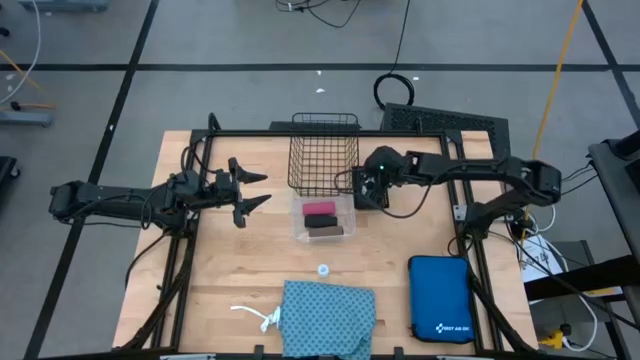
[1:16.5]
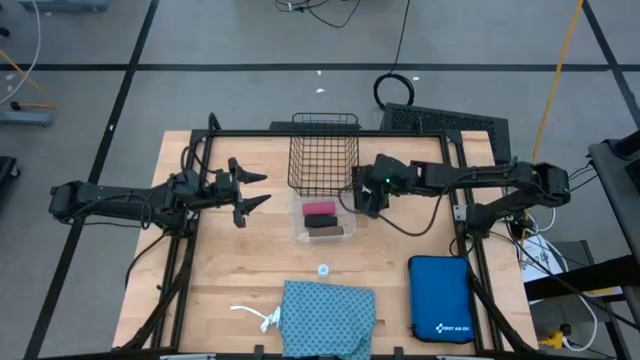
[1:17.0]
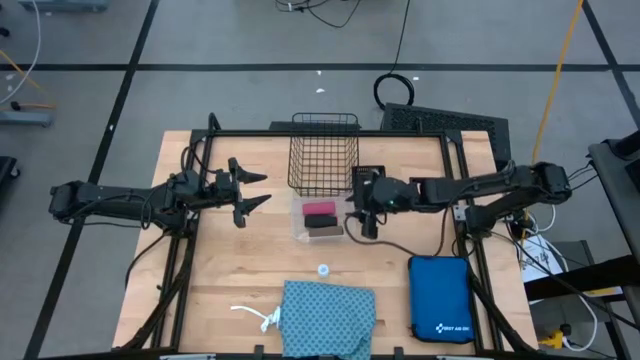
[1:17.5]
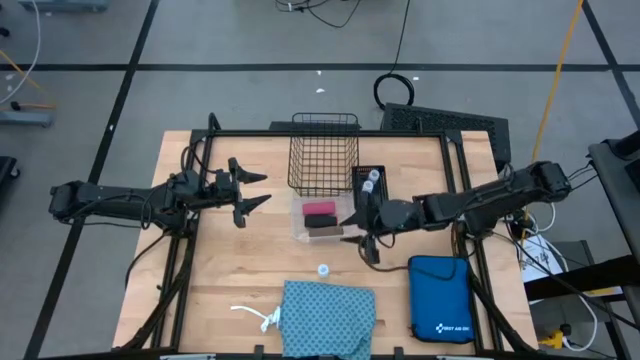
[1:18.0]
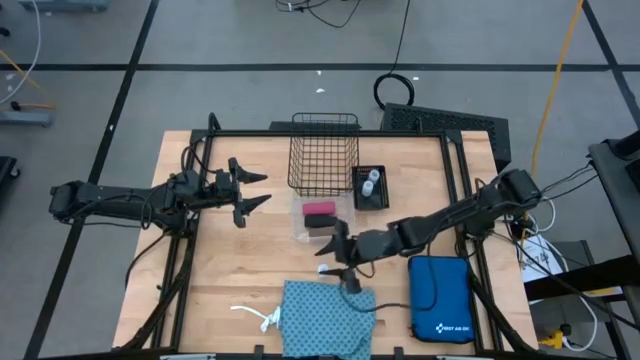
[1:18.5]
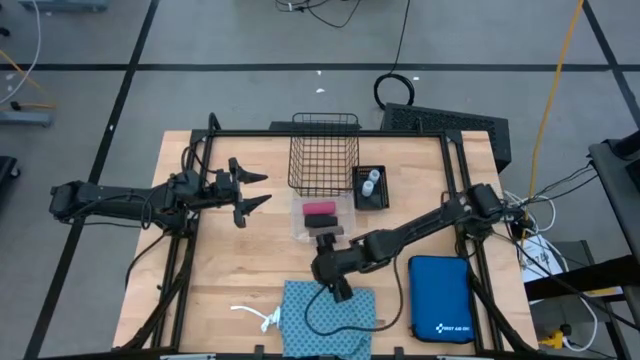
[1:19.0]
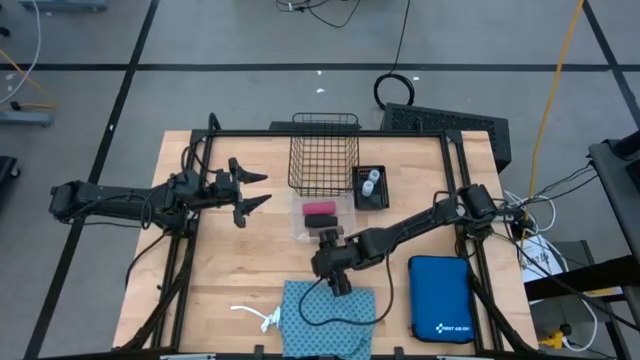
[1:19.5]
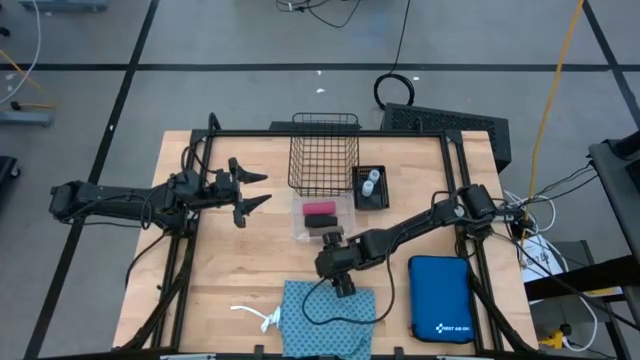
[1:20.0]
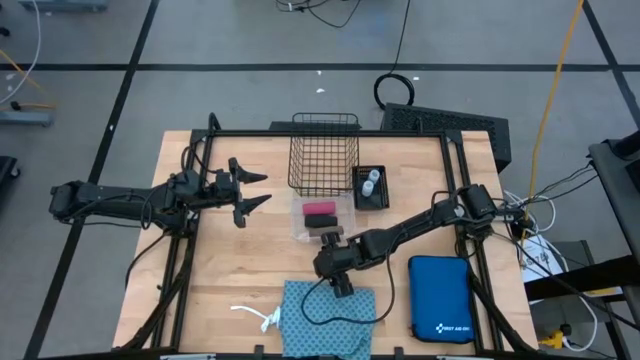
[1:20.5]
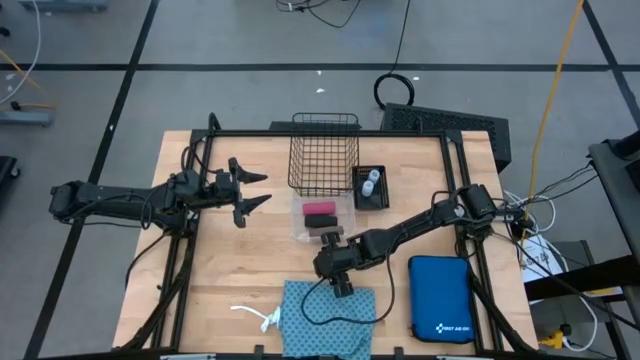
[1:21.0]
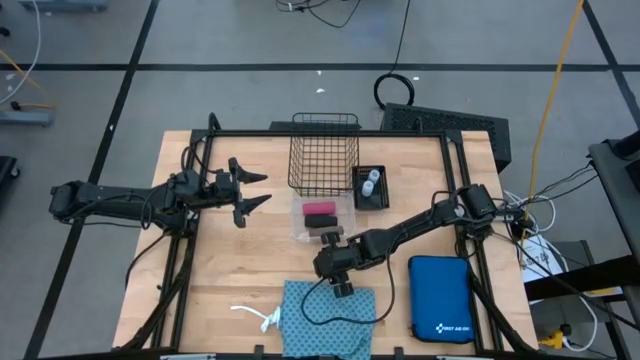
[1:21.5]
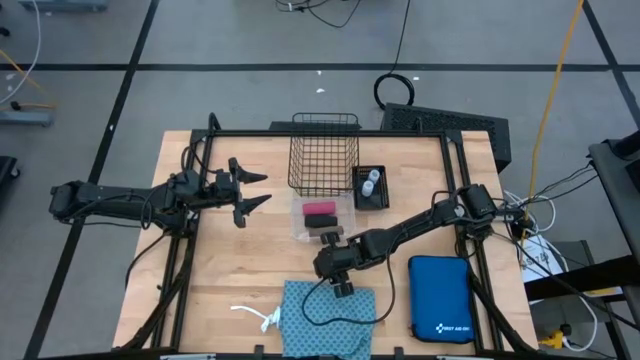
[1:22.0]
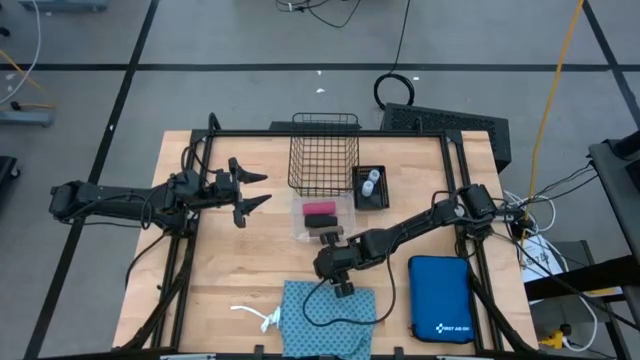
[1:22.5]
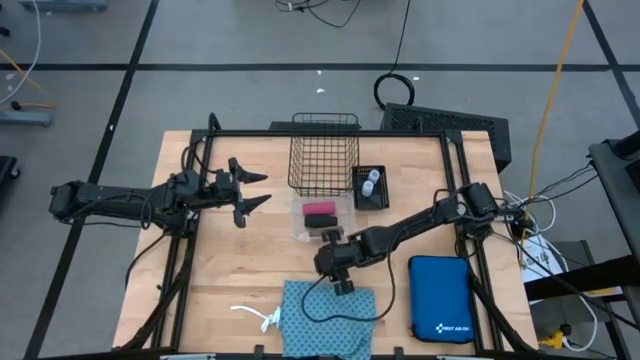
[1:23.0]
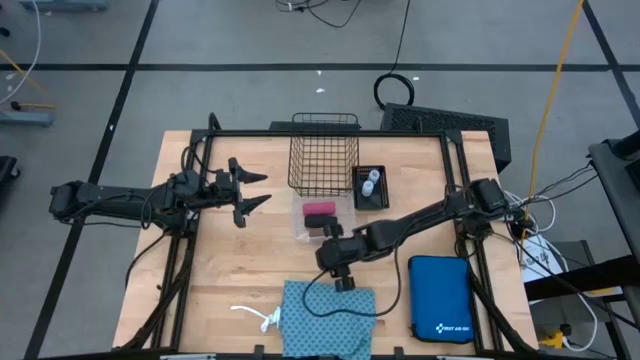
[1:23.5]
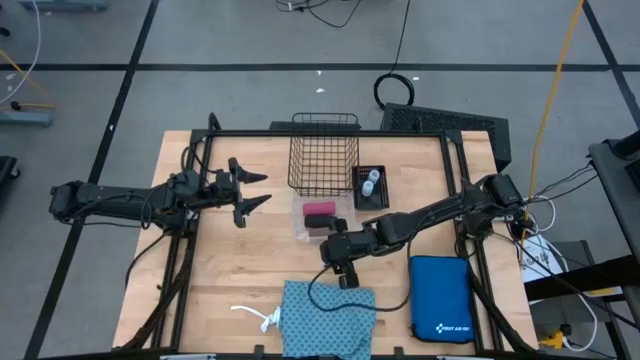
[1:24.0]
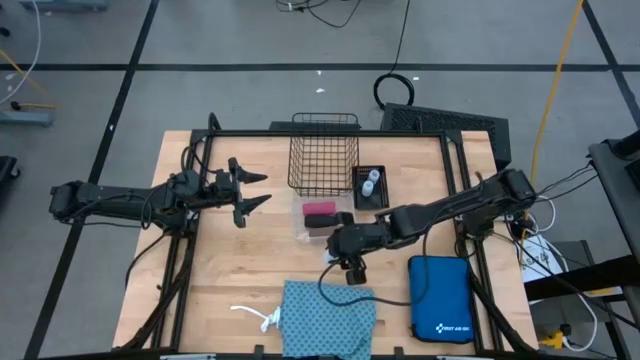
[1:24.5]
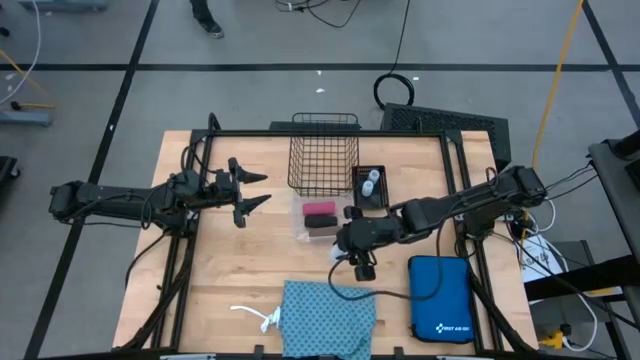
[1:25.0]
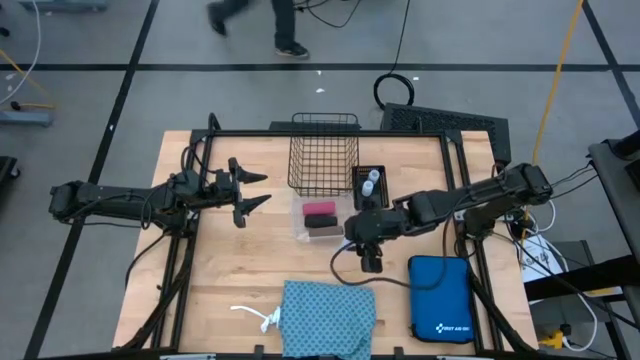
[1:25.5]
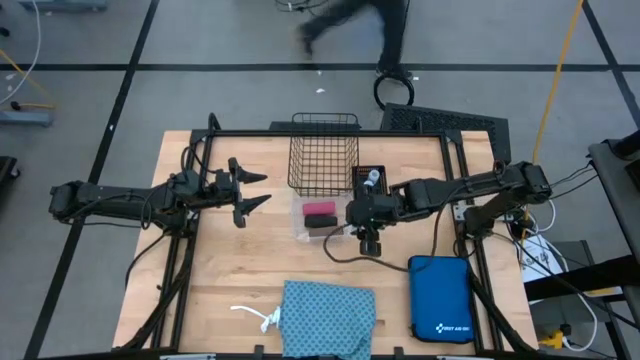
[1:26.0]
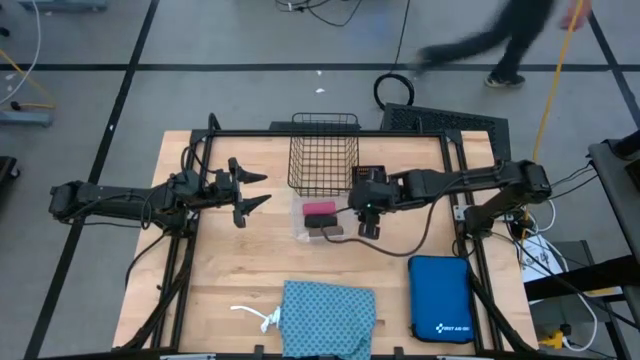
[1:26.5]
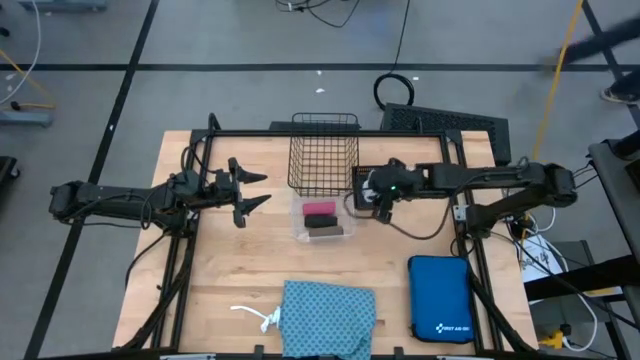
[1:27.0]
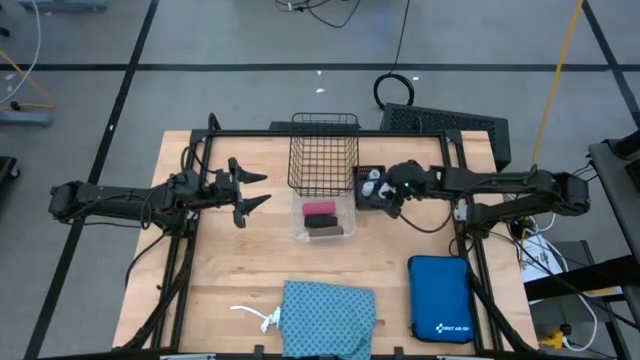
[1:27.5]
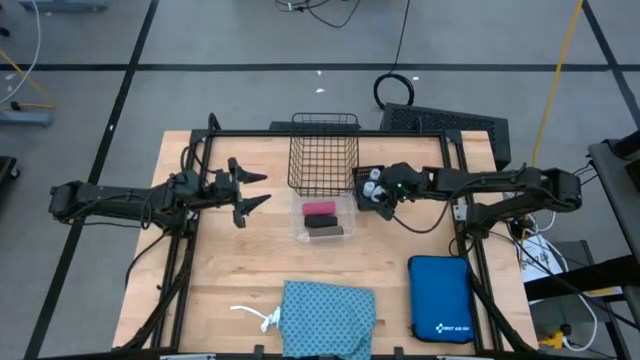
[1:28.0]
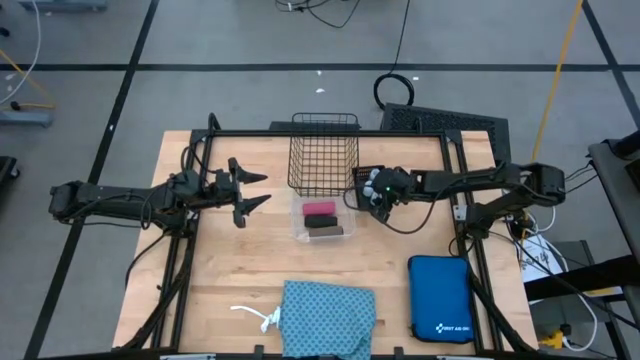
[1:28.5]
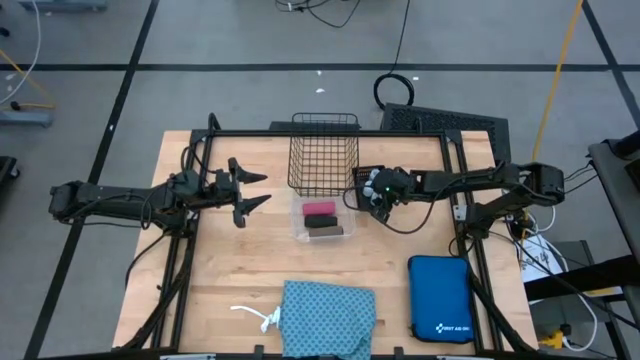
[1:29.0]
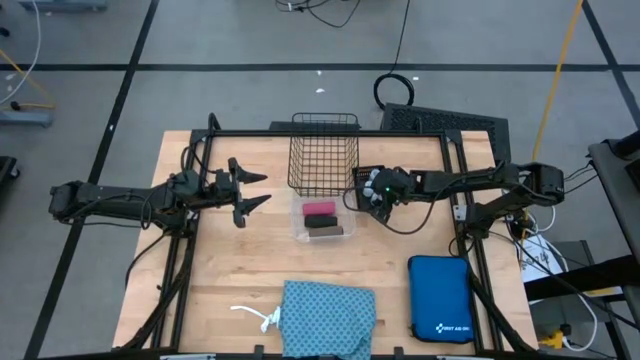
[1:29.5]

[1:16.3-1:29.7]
Task: Pick & Place Medicine items
Put the transparent medicine bottle into the black bin

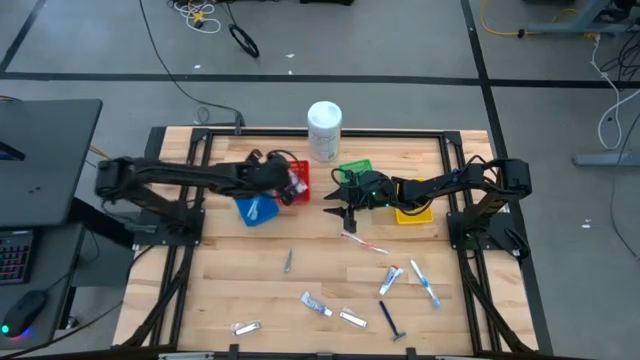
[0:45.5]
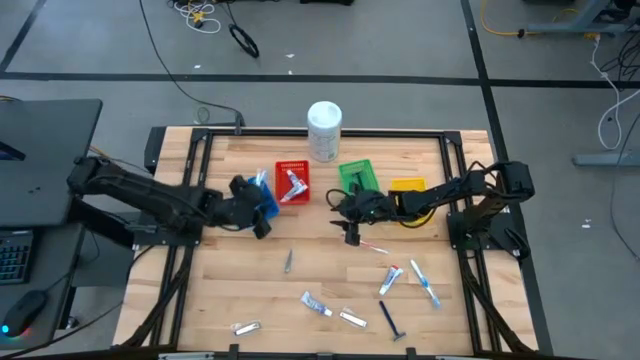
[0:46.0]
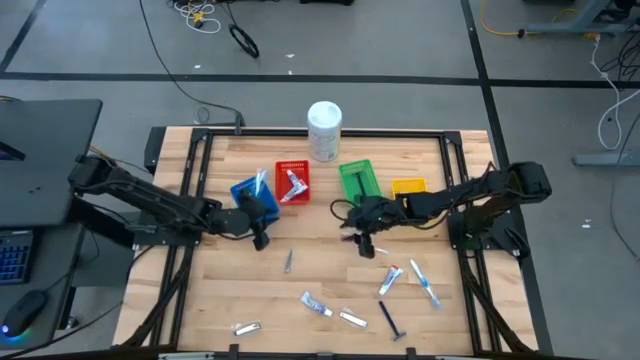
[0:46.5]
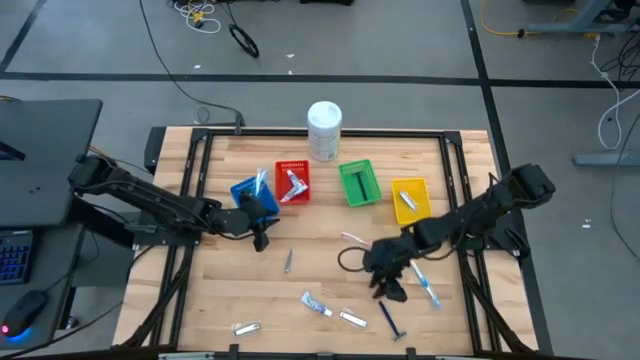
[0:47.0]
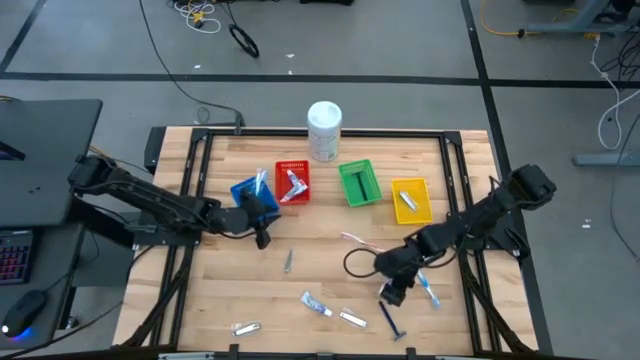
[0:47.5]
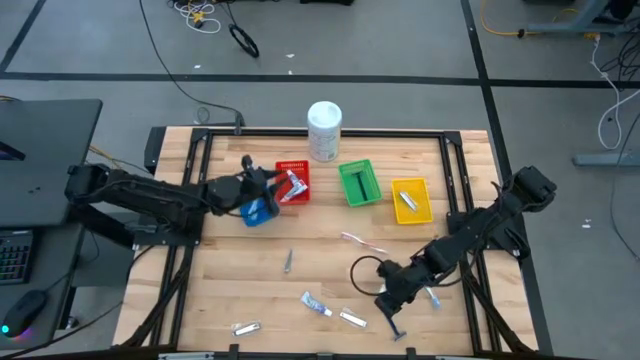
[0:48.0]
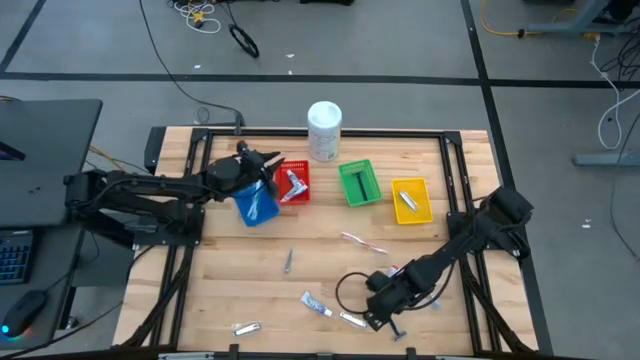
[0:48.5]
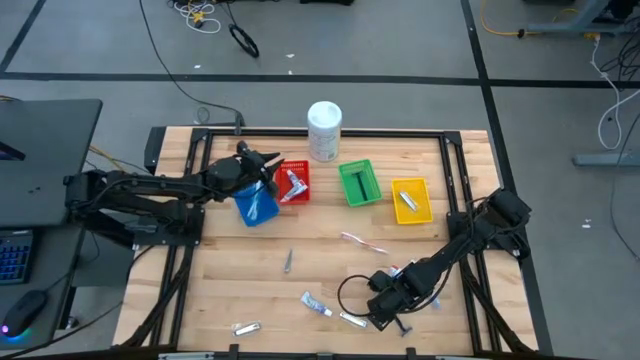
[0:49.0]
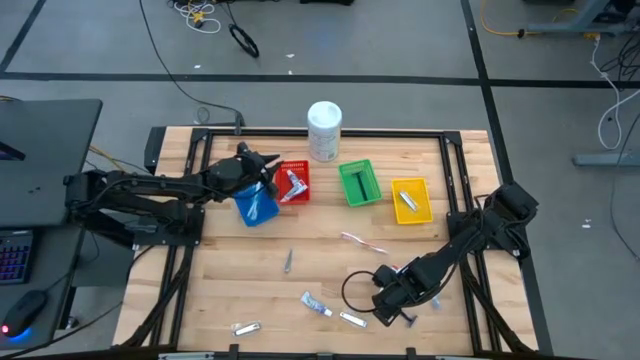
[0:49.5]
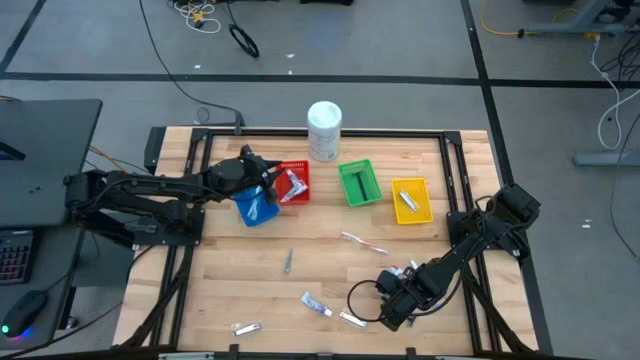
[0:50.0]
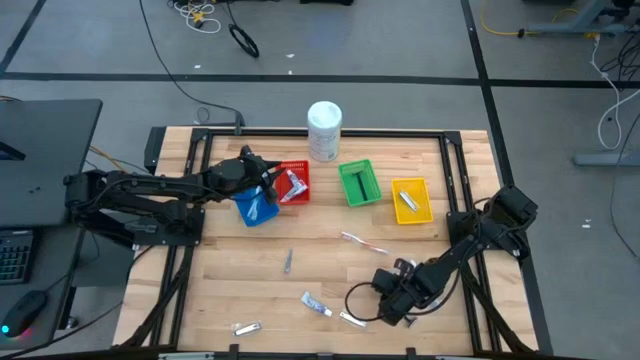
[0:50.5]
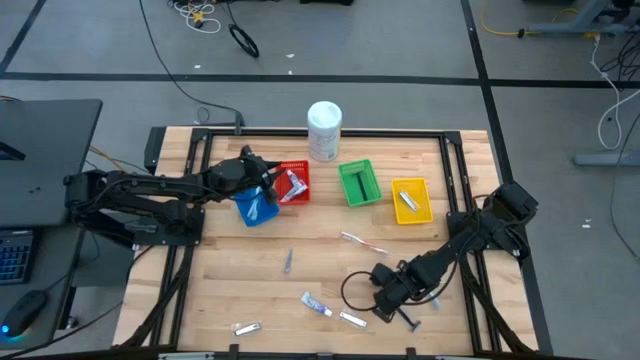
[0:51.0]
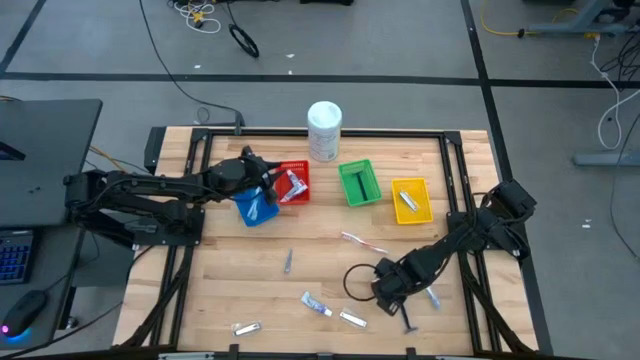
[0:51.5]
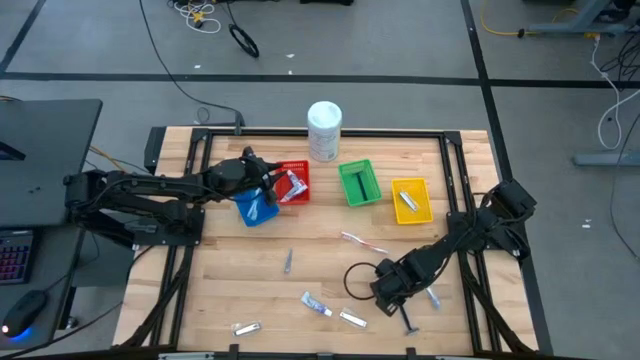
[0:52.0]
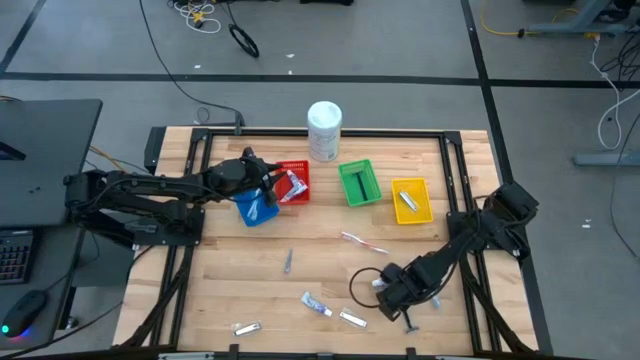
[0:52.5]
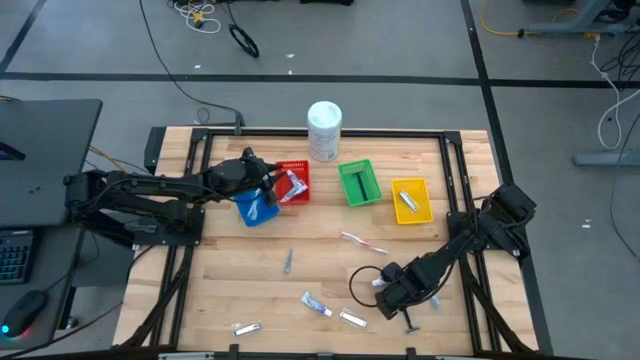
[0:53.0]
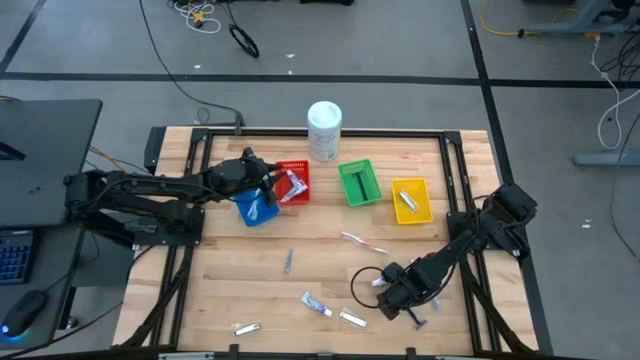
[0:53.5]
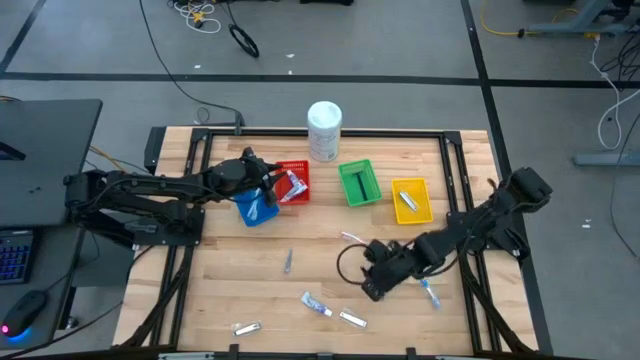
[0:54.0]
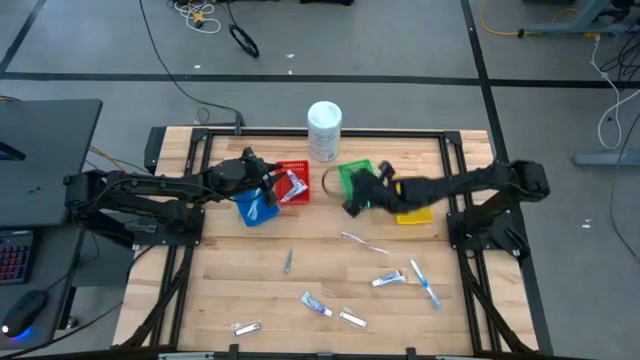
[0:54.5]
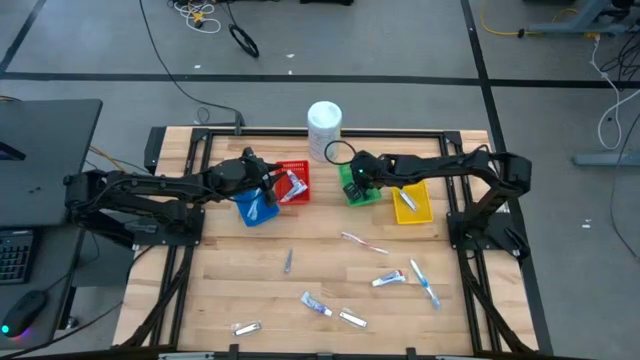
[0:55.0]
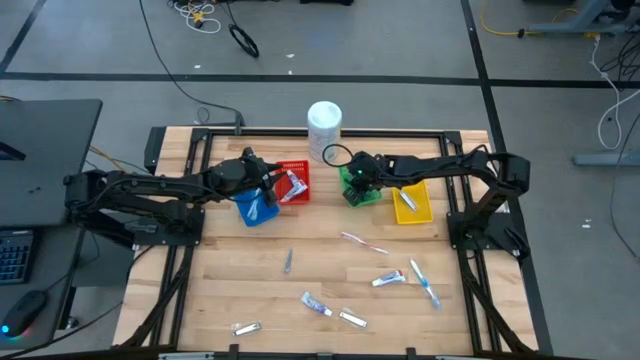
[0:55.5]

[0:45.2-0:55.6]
Task: Pick & Place Travel size toiletries
Put the blue razor into the green bin
